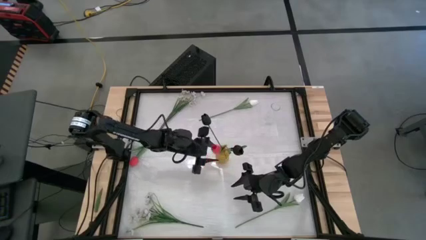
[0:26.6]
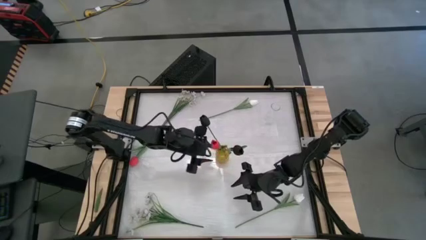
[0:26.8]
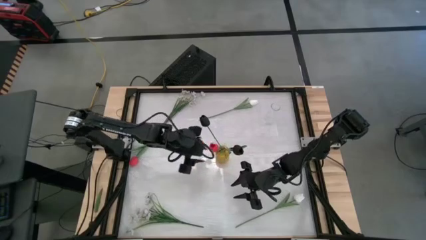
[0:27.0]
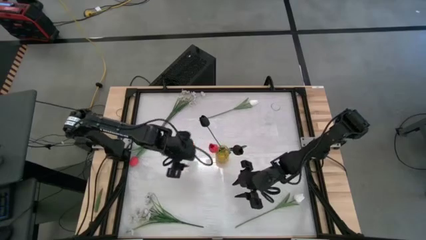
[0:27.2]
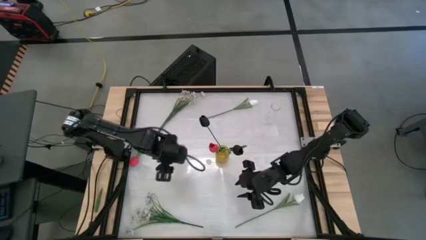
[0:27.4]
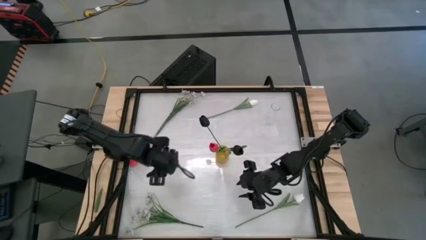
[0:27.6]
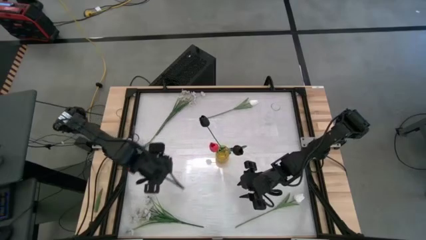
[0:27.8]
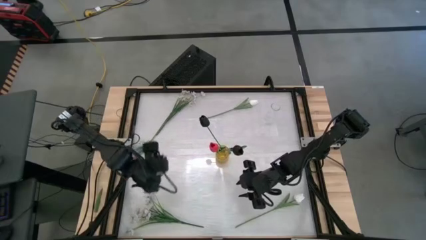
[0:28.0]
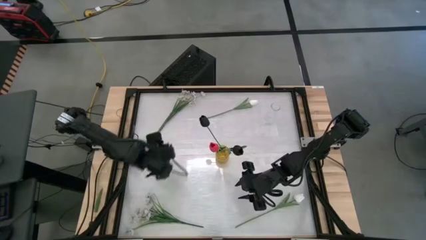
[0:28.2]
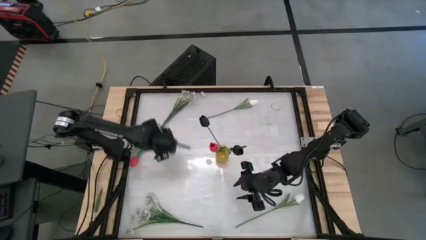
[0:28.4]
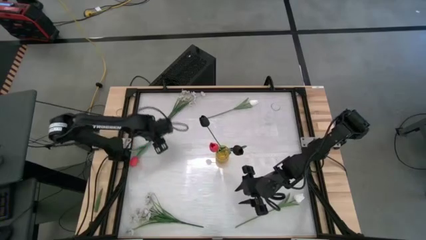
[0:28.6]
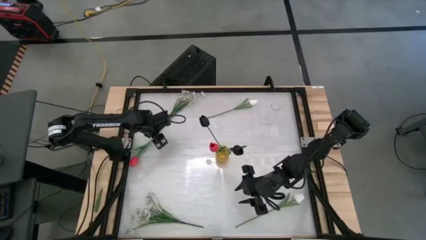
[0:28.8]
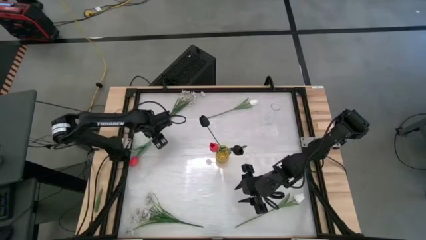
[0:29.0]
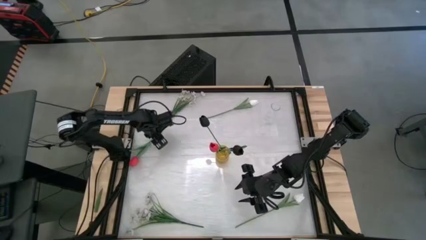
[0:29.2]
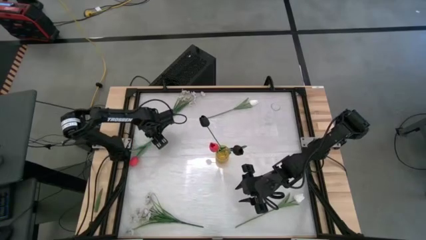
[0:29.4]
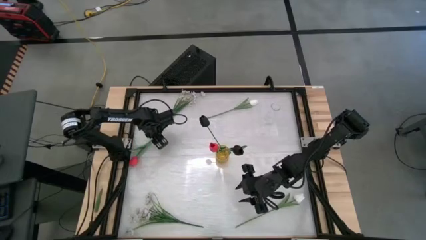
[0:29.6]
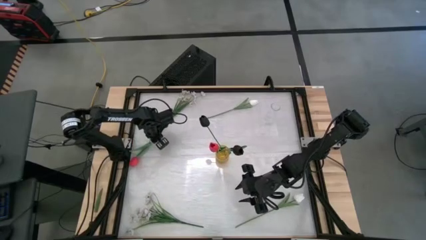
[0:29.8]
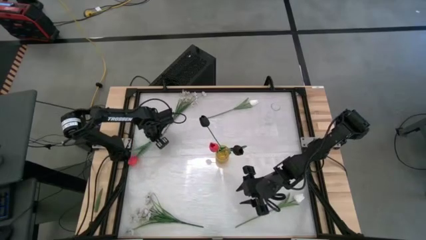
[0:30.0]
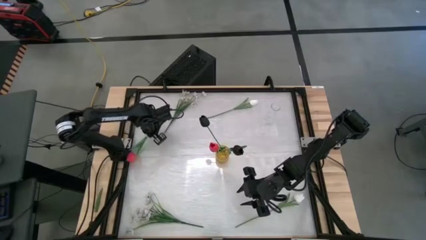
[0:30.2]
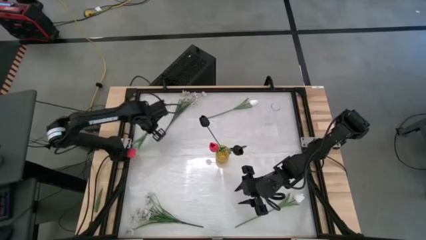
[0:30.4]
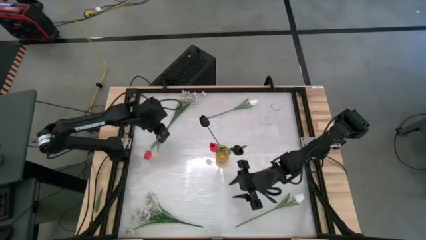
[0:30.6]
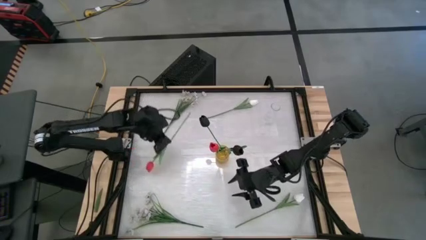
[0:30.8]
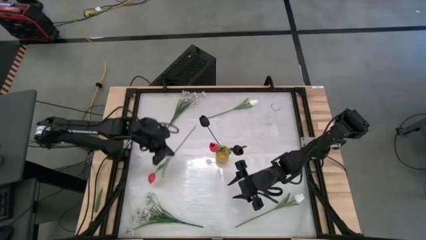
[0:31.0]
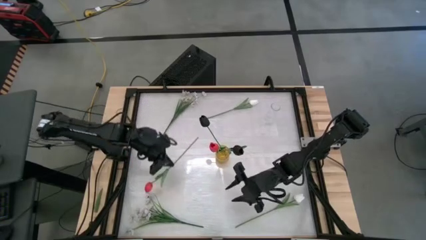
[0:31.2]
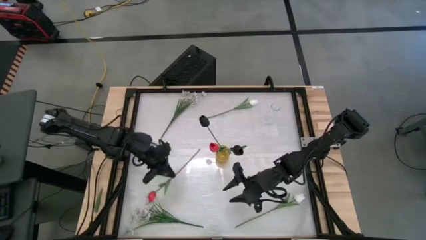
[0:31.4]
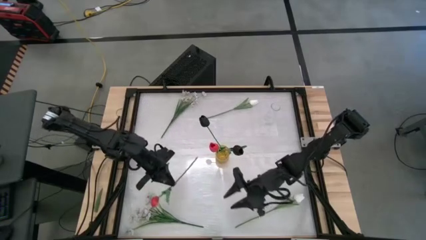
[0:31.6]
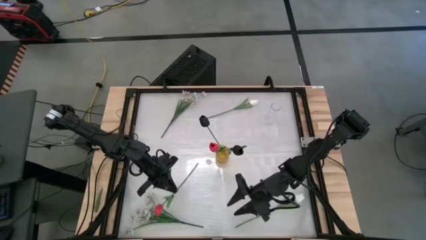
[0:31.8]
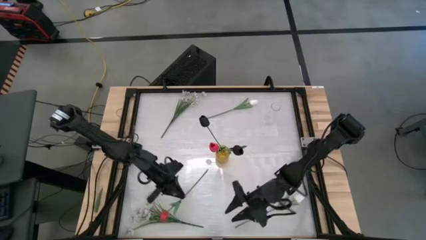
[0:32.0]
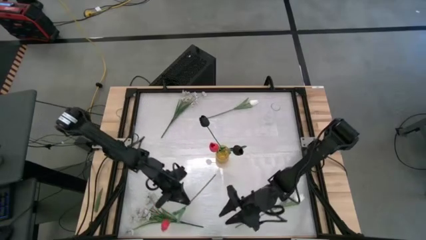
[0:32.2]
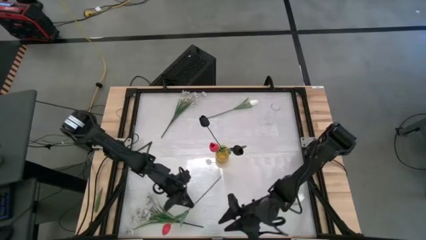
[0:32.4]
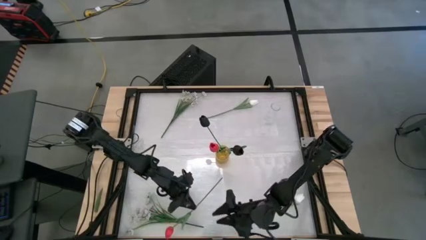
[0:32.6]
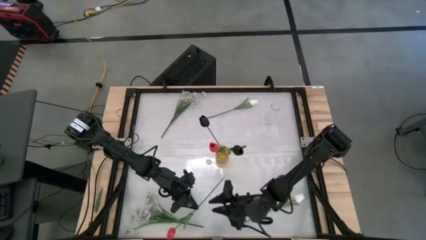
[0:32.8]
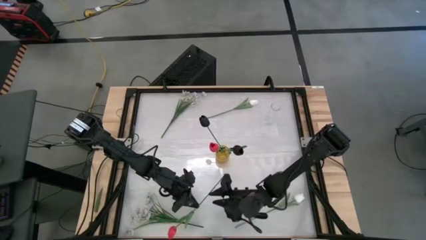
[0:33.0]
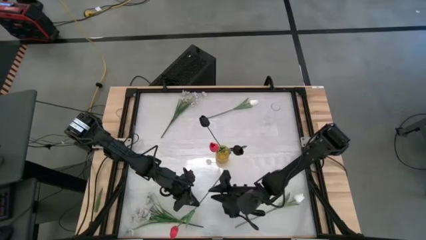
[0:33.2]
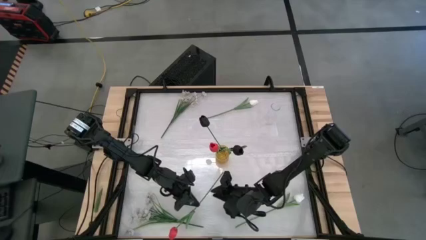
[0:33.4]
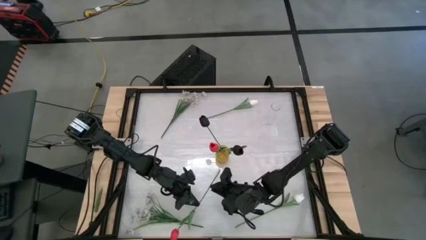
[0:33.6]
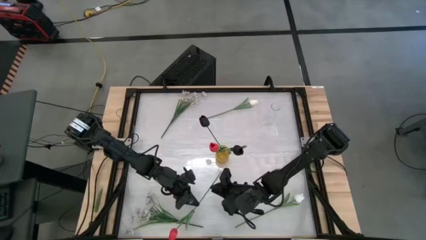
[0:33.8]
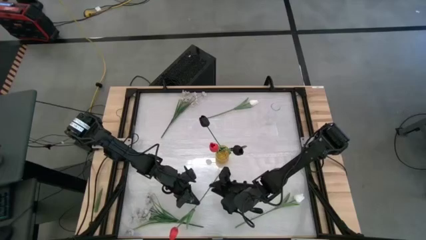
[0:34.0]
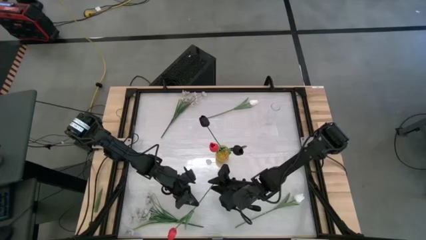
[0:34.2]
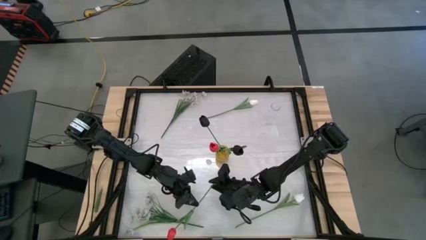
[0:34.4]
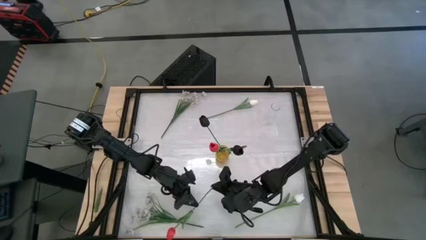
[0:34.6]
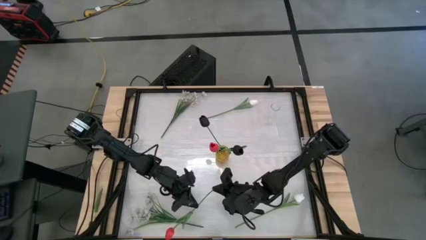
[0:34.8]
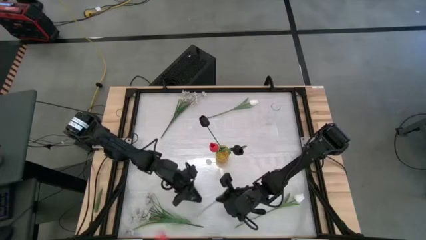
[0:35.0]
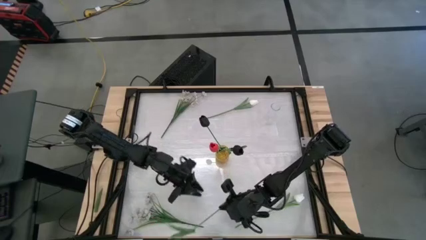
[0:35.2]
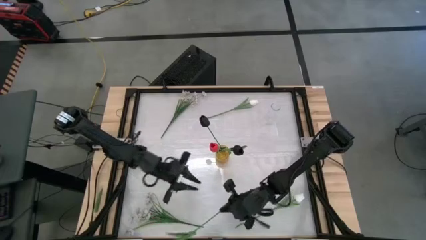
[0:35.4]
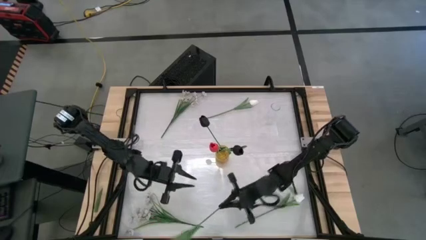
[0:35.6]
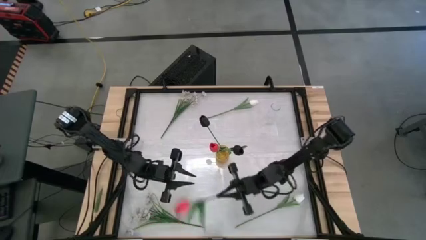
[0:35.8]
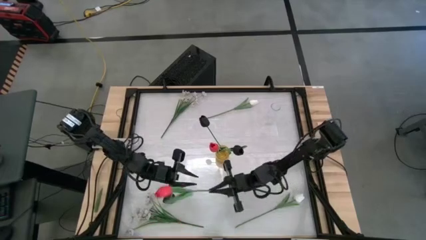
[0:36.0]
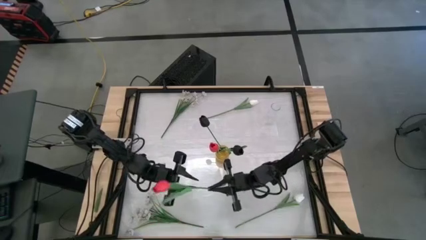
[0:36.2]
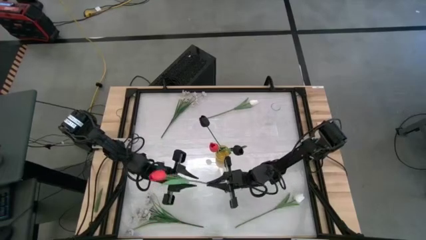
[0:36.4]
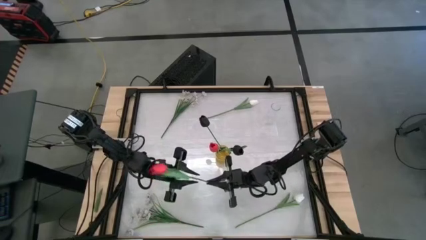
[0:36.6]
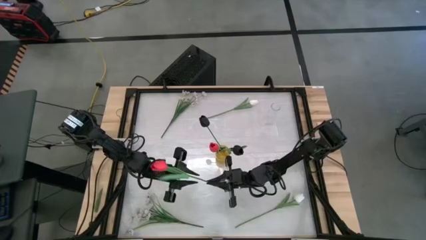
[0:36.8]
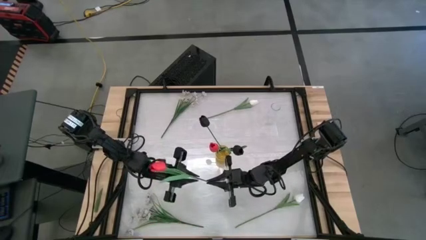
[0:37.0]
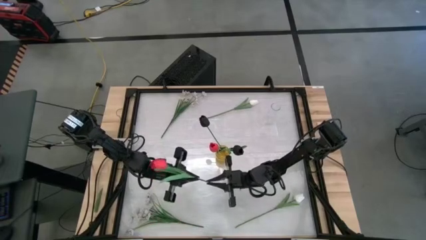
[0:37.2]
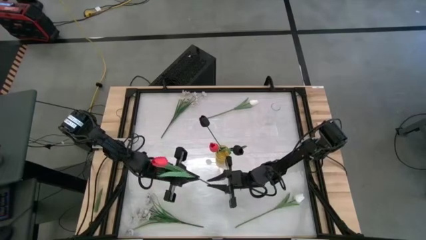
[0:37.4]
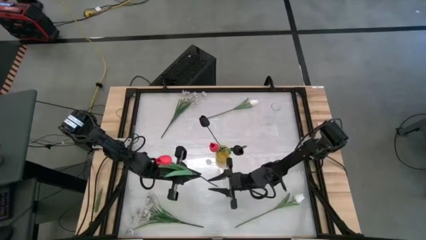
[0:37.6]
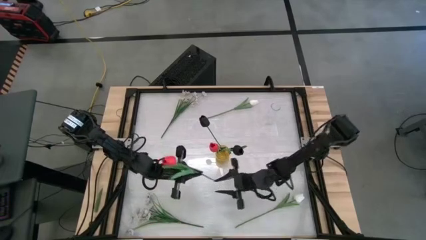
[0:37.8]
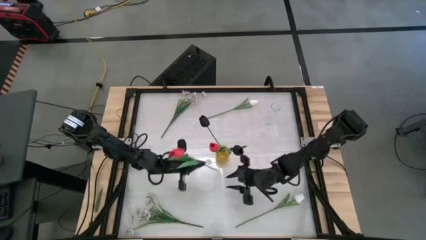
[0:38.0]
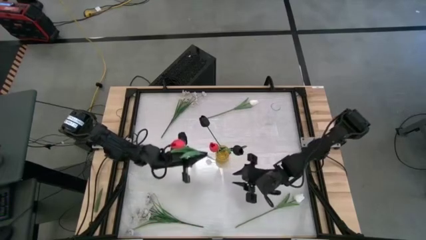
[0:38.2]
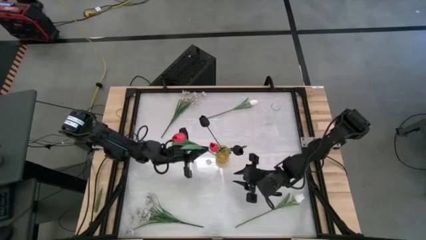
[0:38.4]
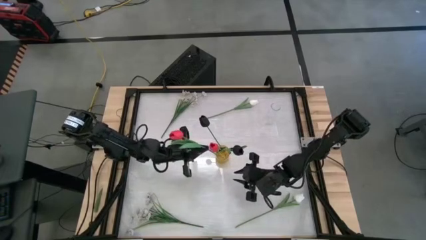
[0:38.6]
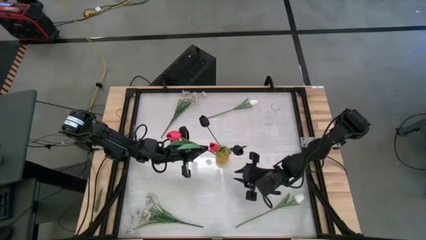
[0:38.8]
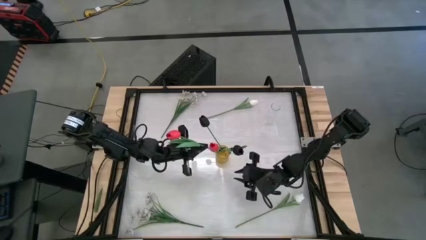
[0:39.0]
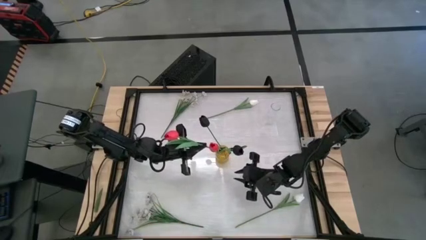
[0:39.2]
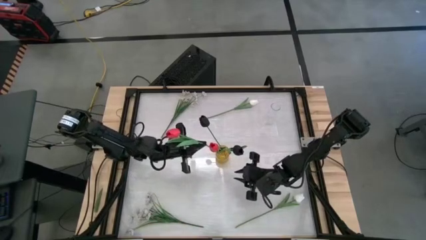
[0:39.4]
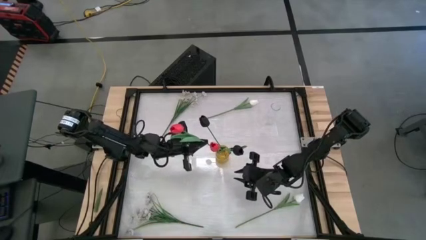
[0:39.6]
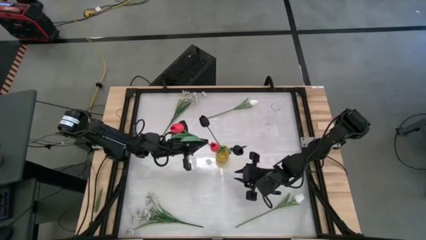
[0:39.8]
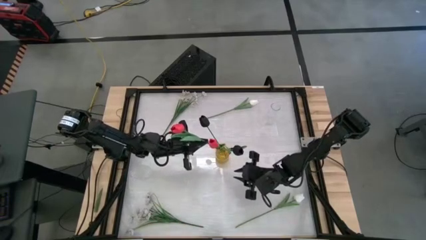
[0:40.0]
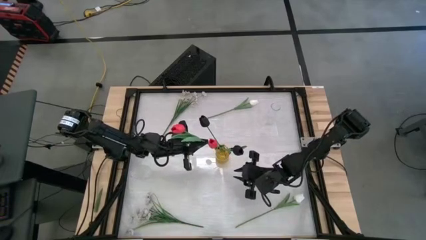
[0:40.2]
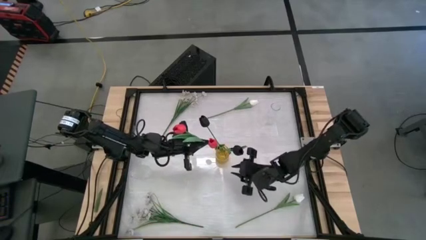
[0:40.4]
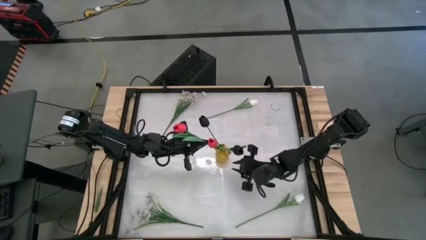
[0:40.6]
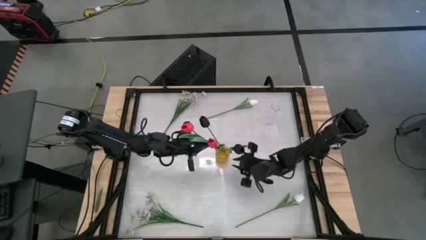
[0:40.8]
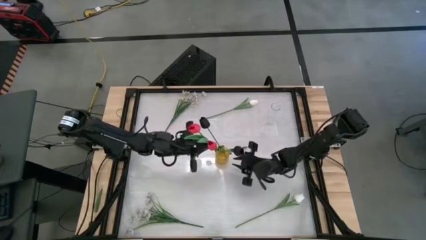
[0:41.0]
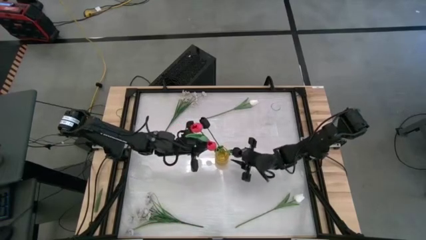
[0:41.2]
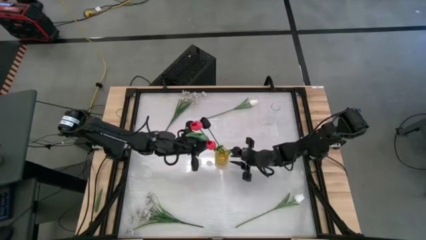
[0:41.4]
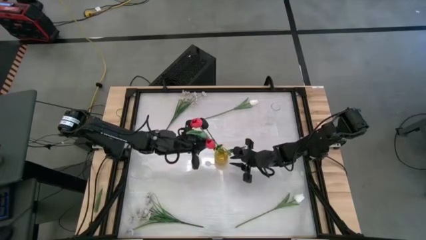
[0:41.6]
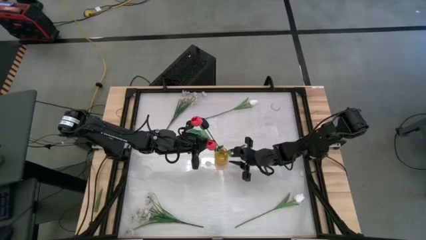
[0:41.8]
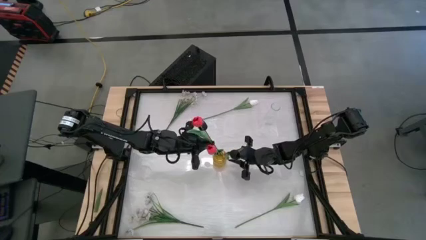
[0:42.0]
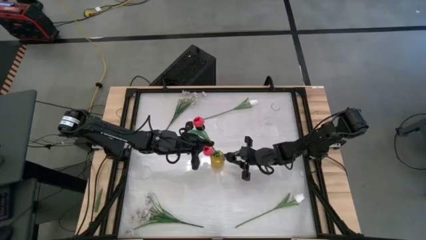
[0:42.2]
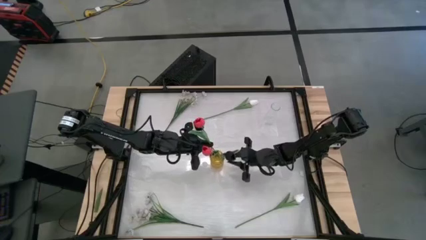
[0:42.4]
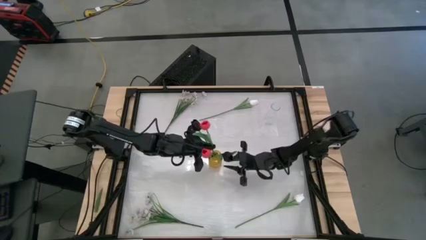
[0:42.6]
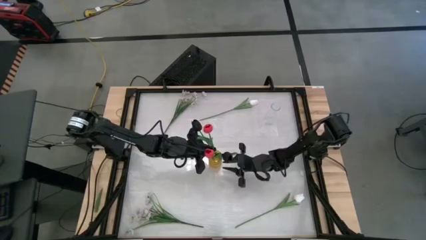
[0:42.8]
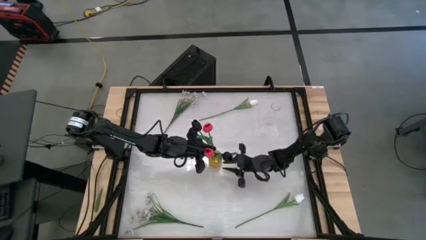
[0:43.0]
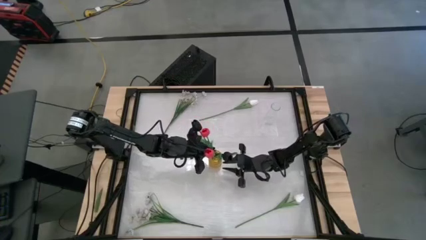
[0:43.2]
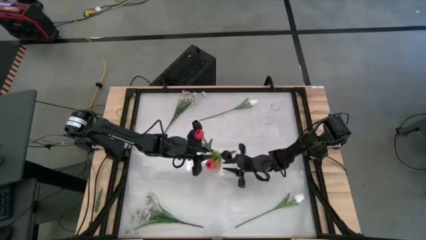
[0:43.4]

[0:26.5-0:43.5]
Task: Sort flowers into vase by color
Put the red tulip into the yellow vase
